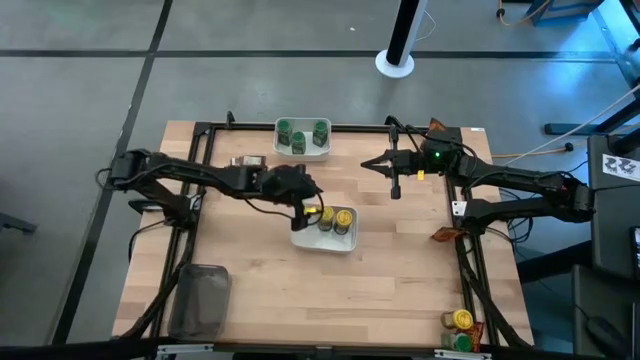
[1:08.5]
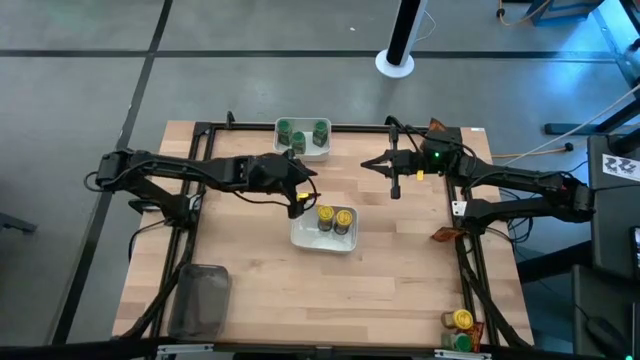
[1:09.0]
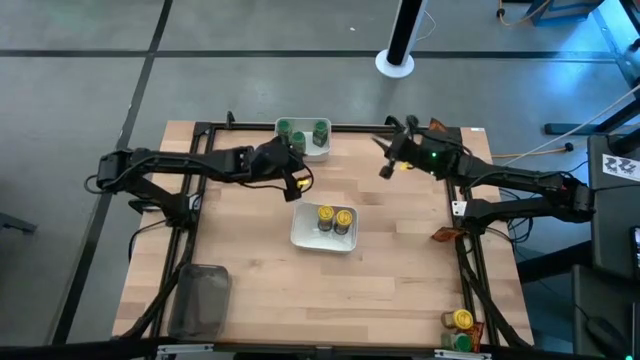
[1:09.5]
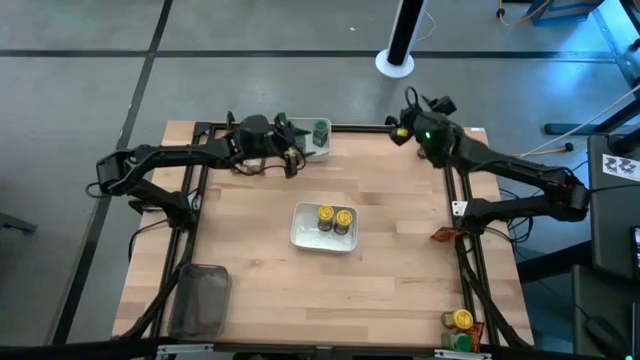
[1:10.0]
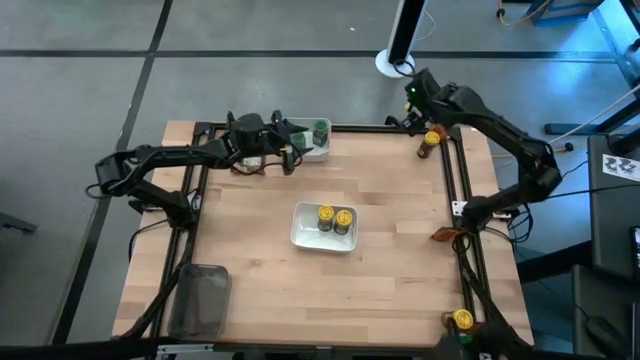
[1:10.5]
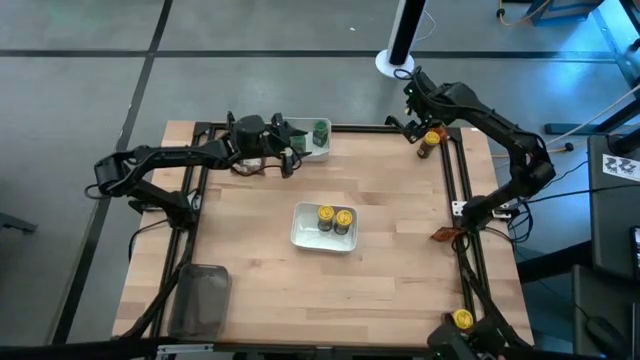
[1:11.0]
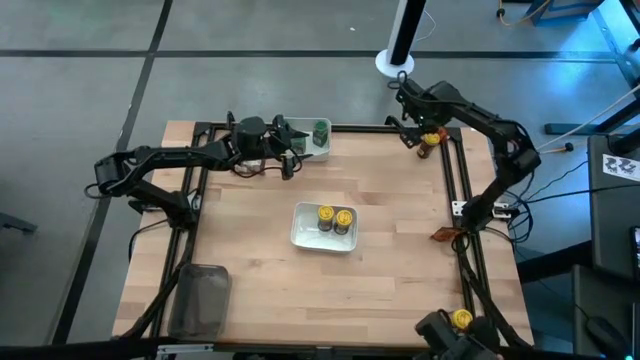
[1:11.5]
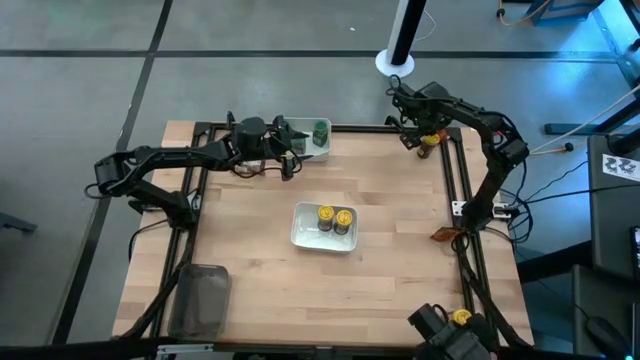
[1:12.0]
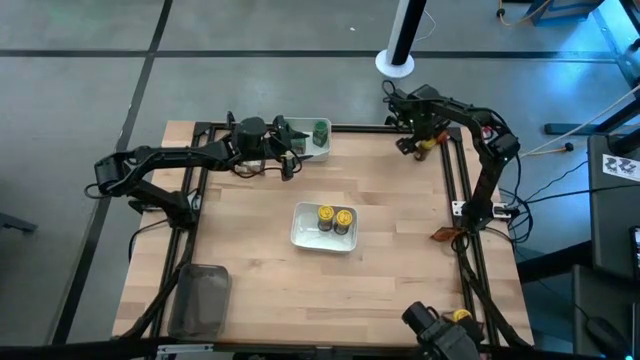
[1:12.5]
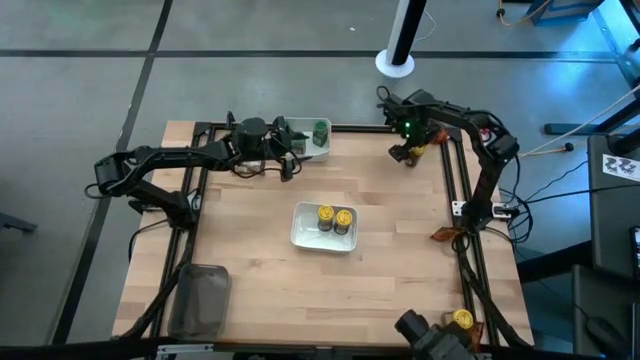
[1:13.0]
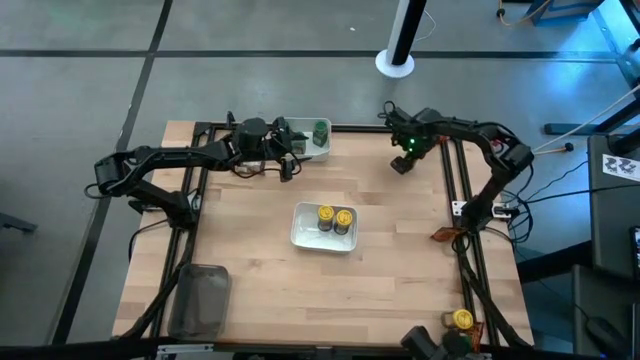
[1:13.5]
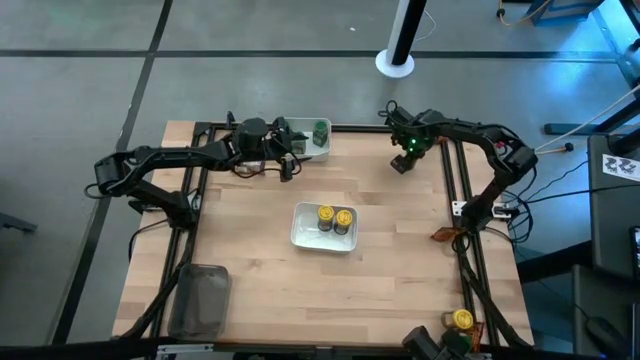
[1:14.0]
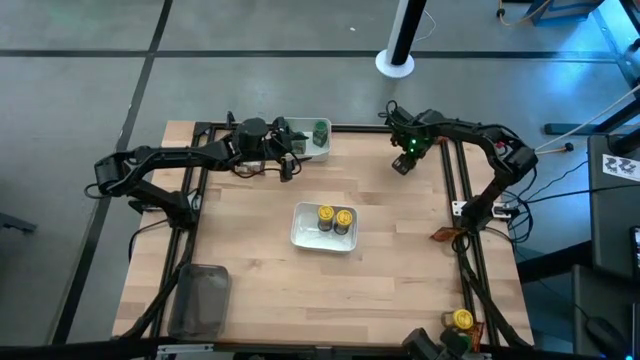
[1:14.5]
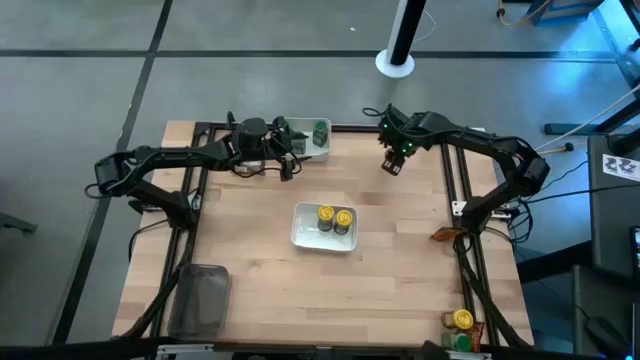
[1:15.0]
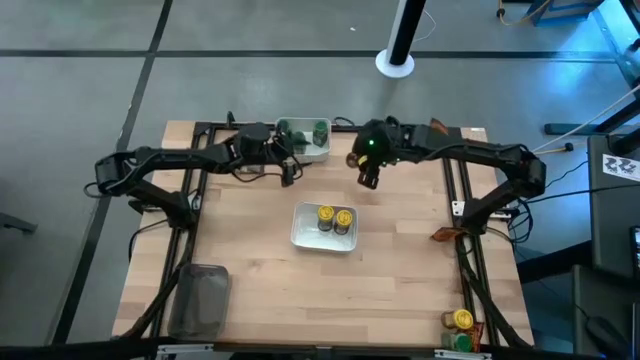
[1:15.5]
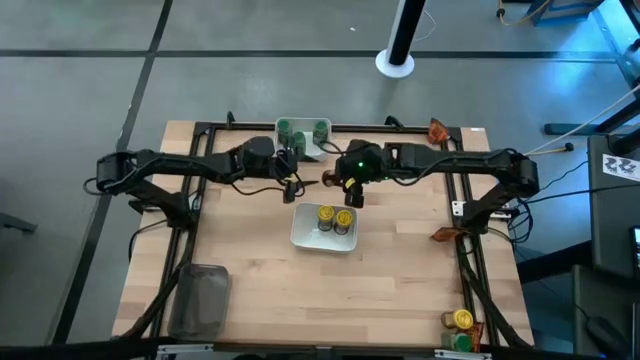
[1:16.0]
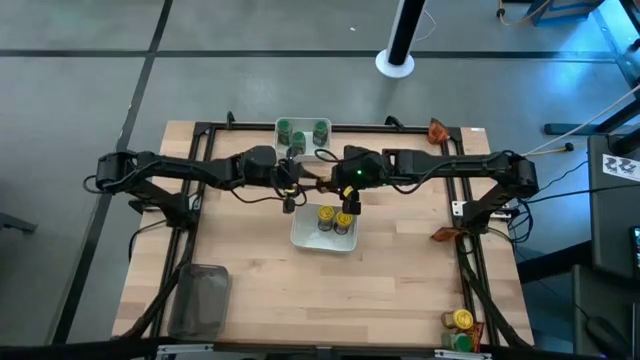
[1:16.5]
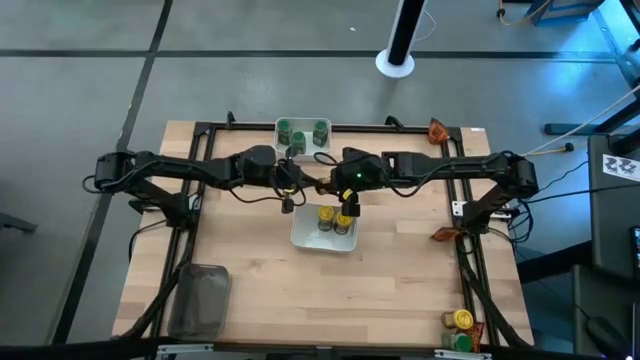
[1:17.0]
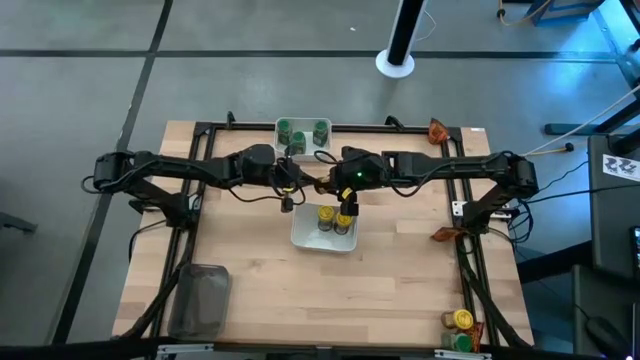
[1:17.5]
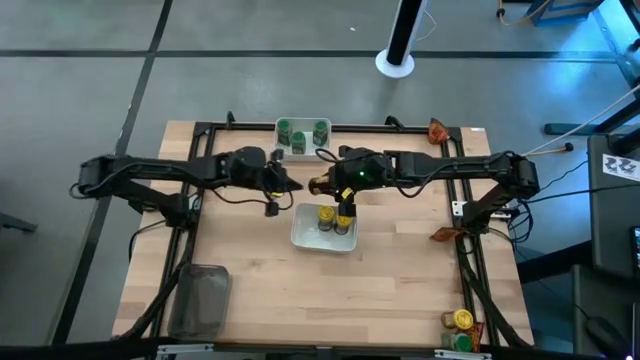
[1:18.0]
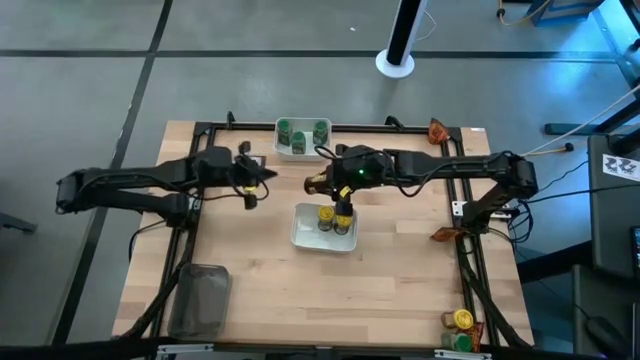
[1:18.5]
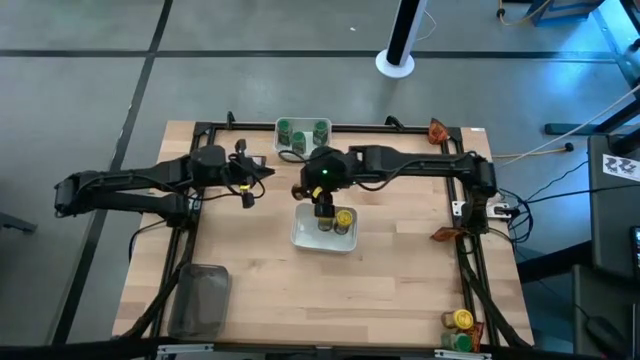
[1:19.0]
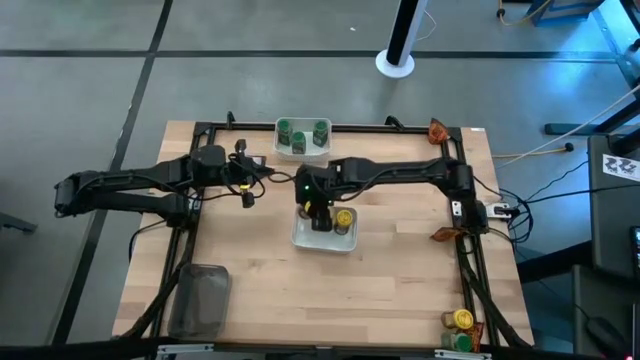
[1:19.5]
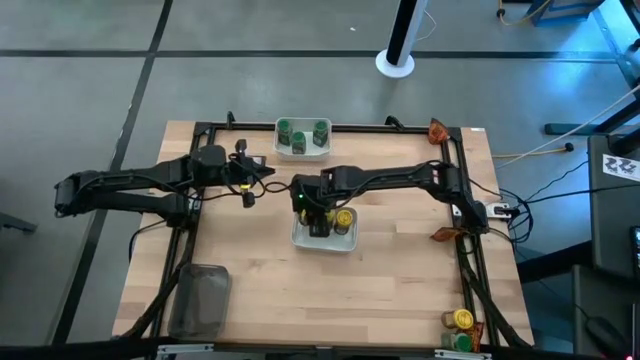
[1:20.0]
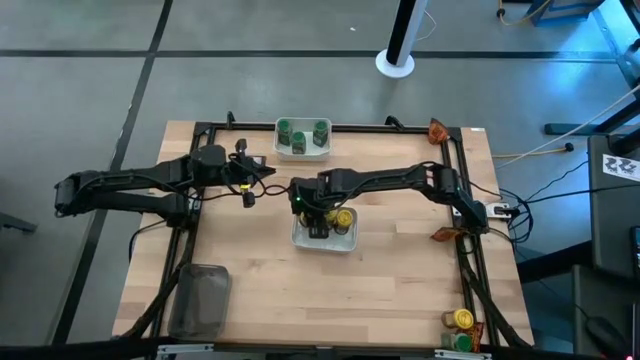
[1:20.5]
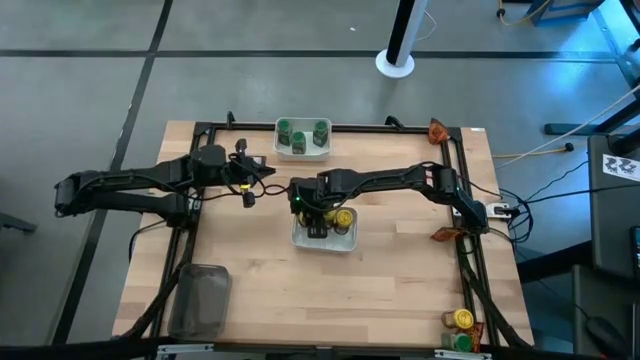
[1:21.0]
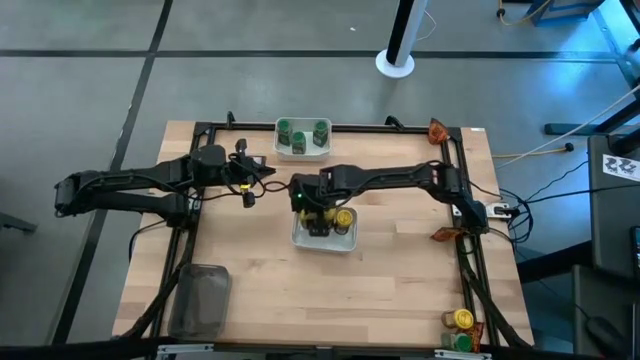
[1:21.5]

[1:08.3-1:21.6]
Task: Sort spices by type
Put the top yellow seasoning bottle into the bottom white bin

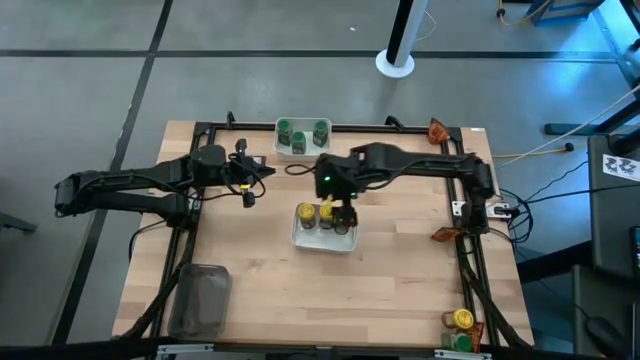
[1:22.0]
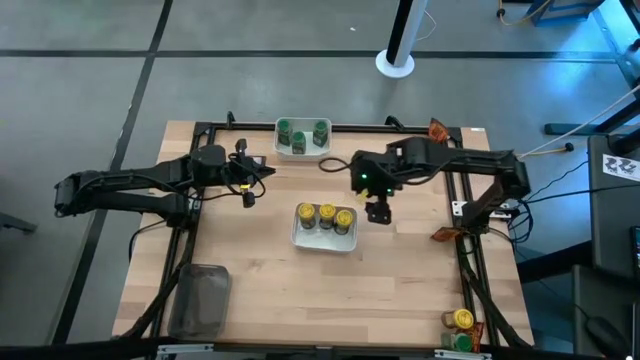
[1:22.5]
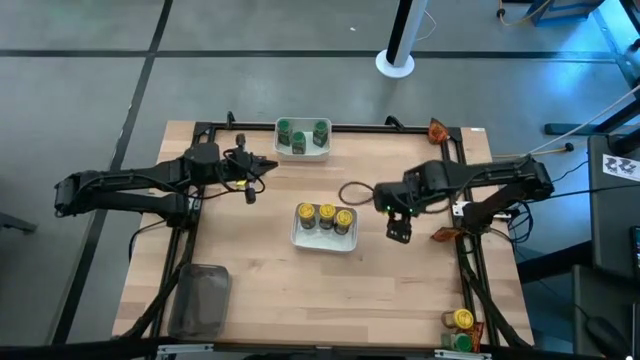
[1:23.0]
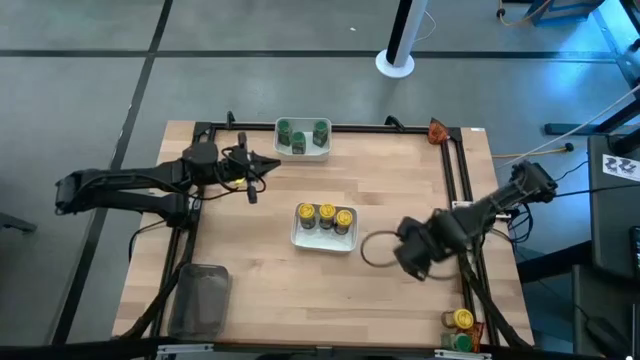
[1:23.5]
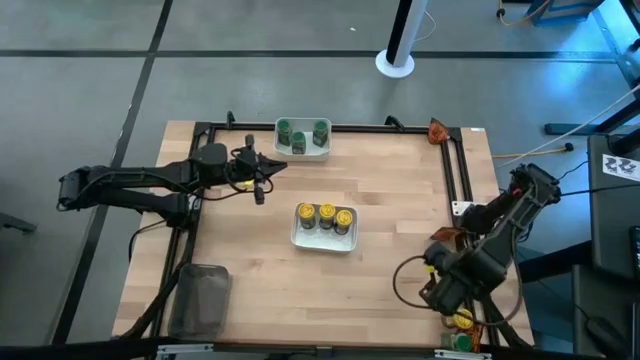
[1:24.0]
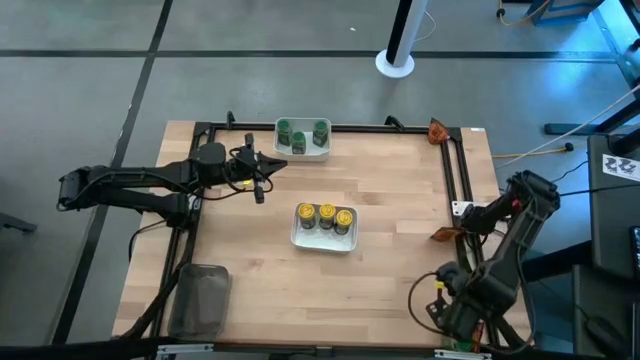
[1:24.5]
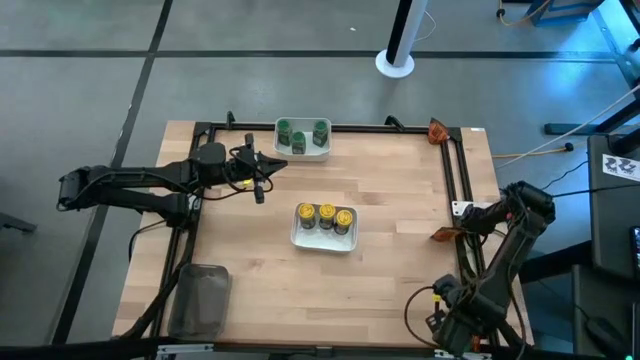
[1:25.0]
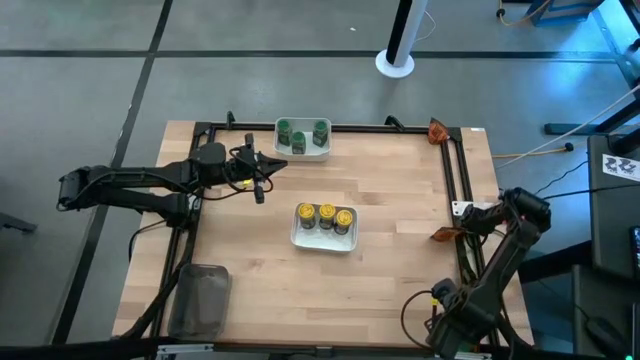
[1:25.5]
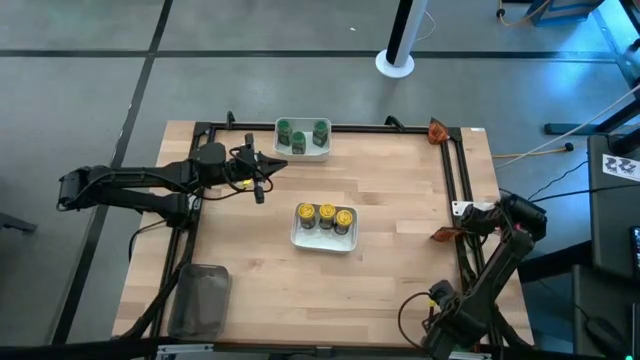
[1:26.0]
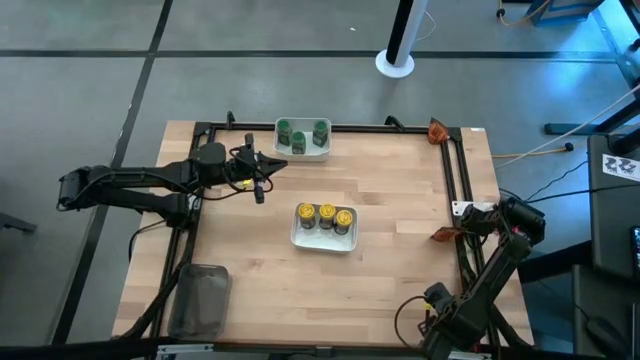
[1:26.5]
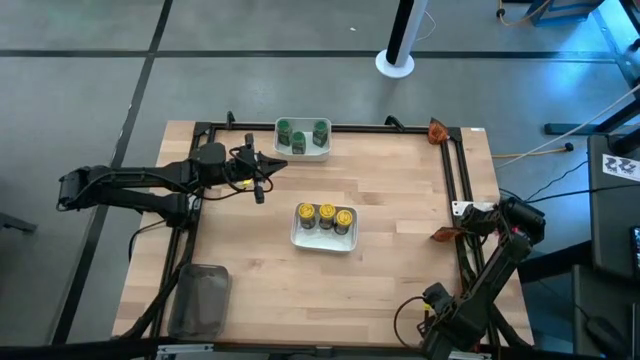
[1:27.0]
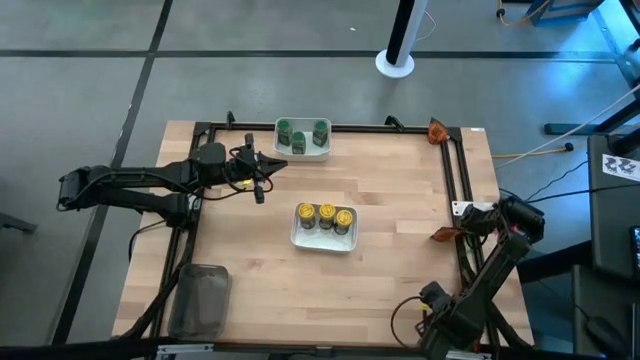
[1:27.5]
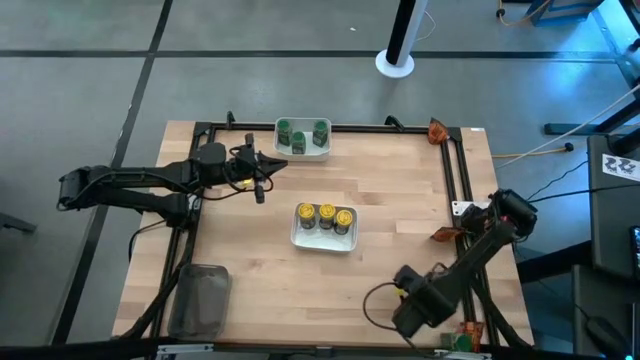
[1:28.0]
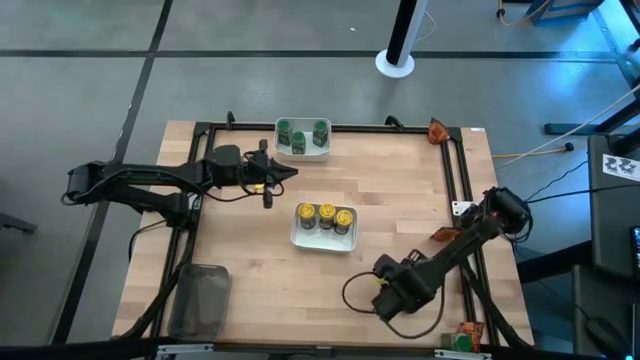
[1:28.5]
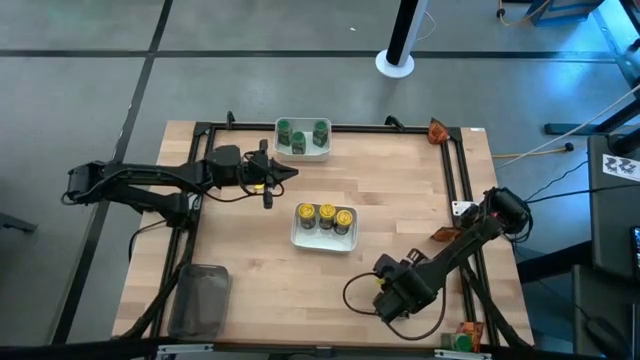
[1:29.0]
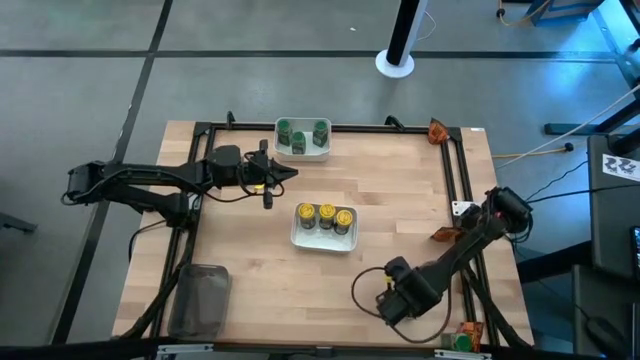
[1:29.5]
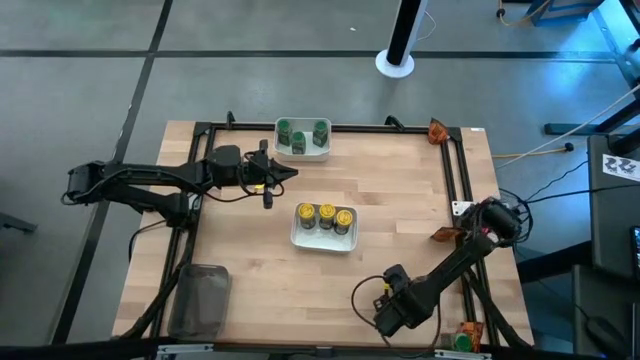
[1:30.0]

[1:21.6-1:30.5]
Put the yellow seasoning bottle into the bottom white bin
